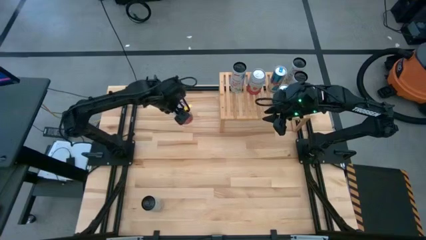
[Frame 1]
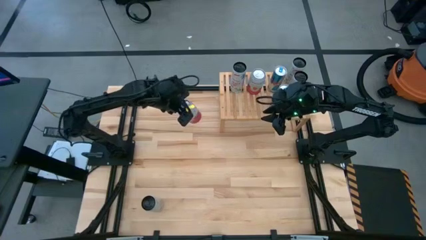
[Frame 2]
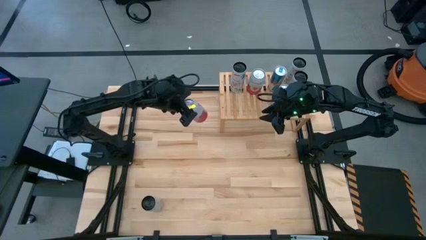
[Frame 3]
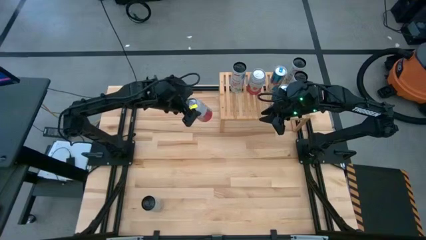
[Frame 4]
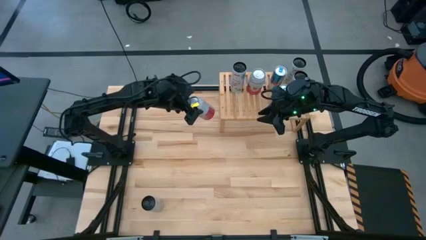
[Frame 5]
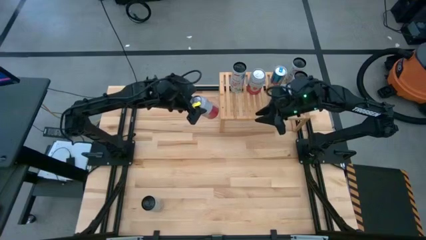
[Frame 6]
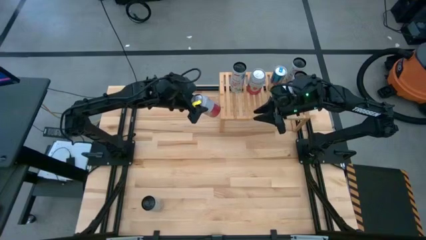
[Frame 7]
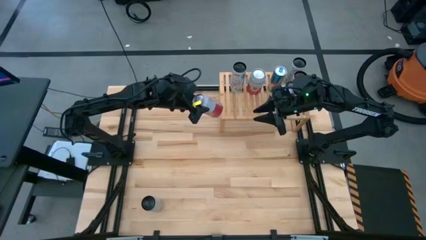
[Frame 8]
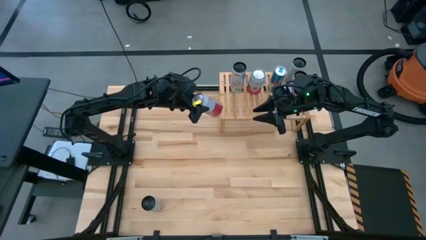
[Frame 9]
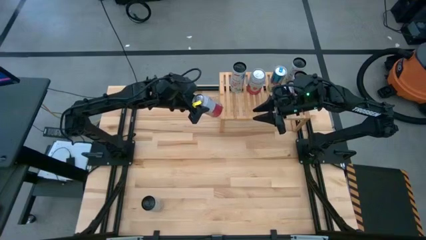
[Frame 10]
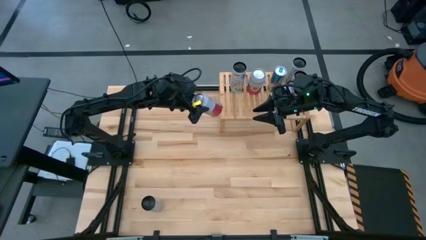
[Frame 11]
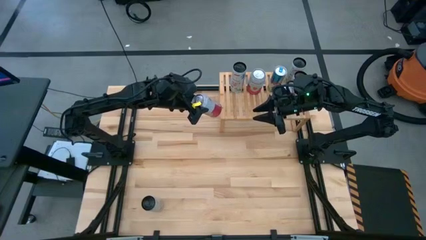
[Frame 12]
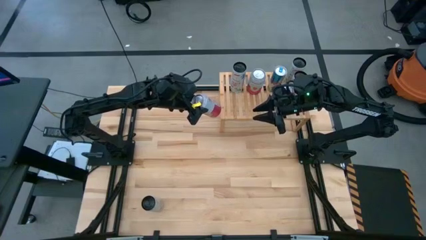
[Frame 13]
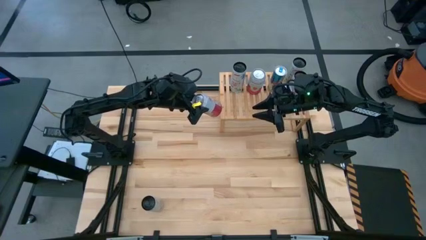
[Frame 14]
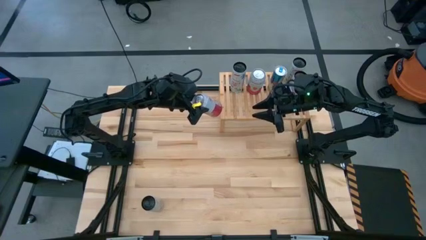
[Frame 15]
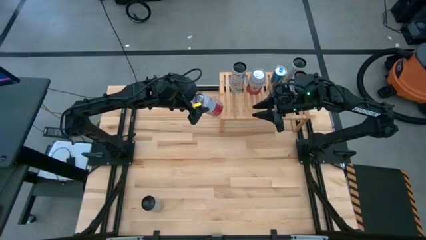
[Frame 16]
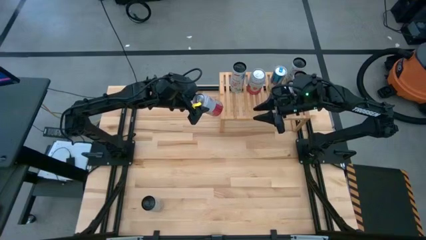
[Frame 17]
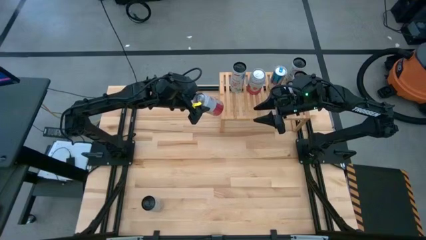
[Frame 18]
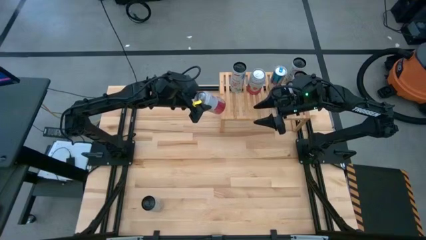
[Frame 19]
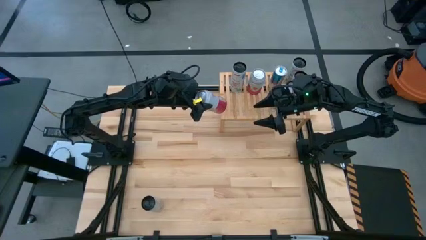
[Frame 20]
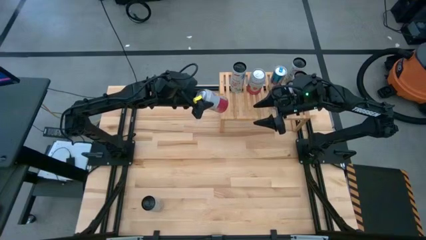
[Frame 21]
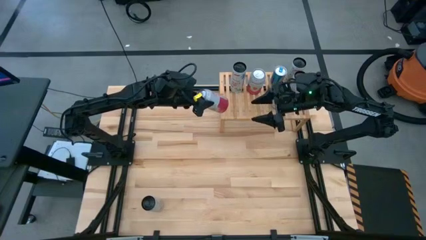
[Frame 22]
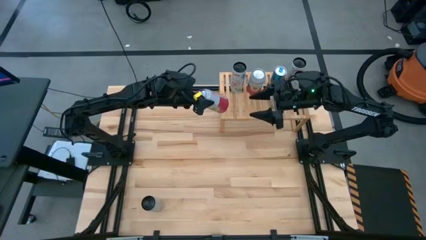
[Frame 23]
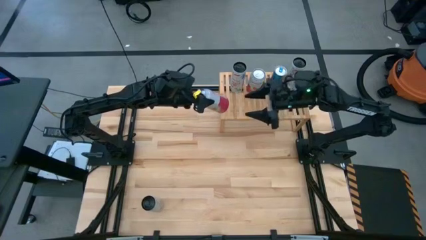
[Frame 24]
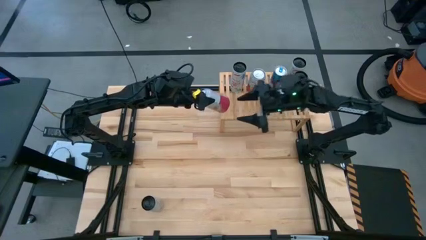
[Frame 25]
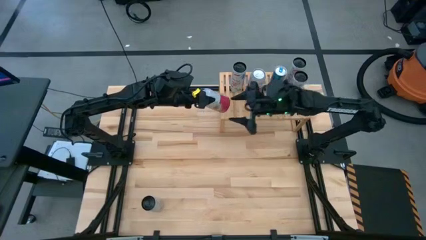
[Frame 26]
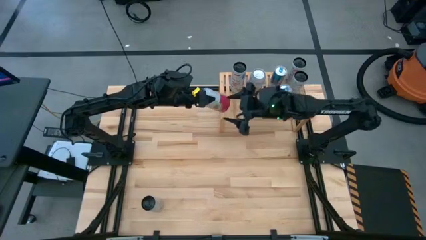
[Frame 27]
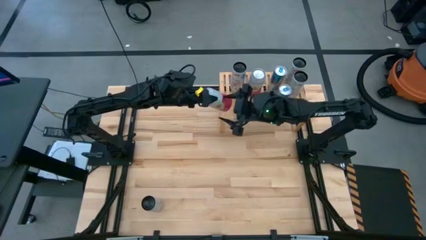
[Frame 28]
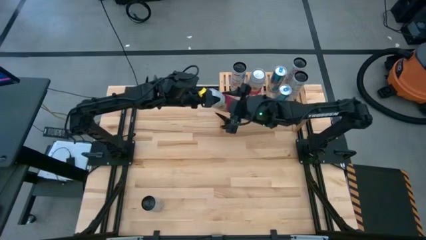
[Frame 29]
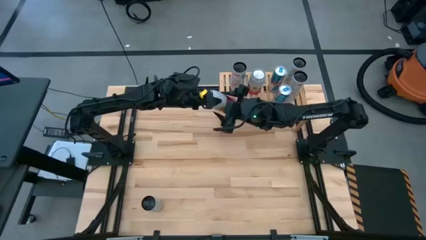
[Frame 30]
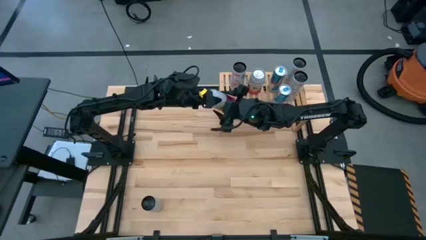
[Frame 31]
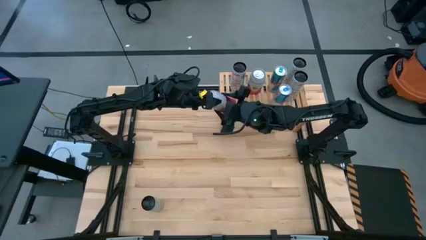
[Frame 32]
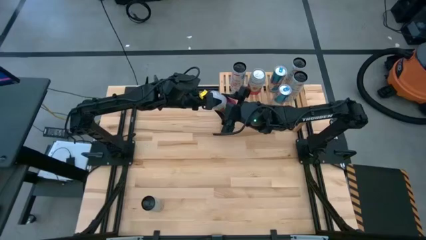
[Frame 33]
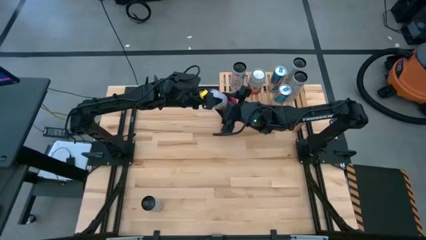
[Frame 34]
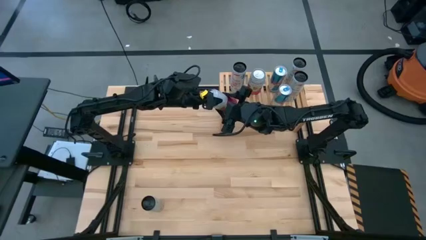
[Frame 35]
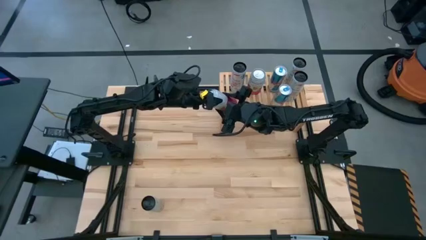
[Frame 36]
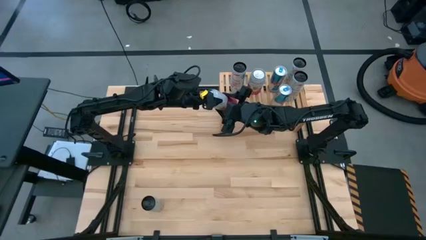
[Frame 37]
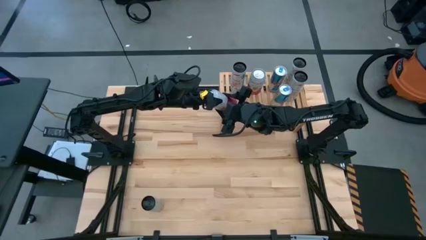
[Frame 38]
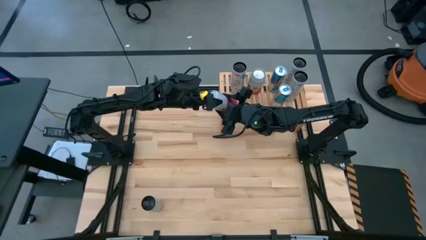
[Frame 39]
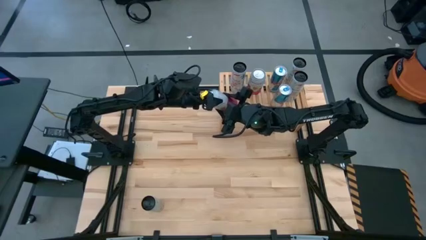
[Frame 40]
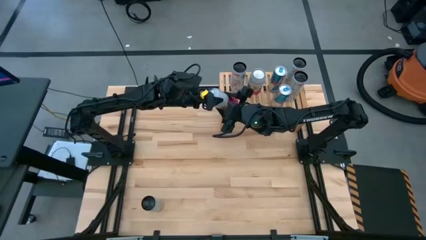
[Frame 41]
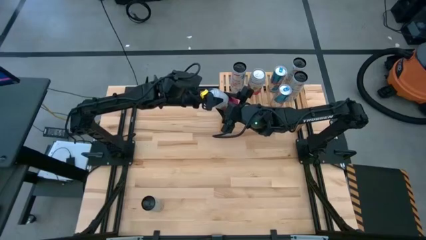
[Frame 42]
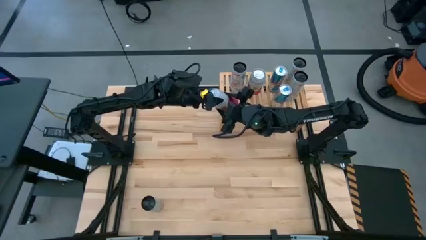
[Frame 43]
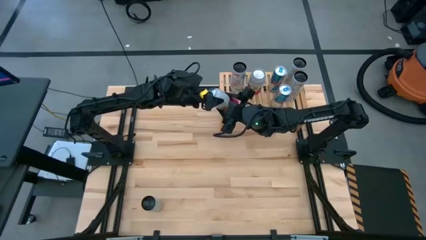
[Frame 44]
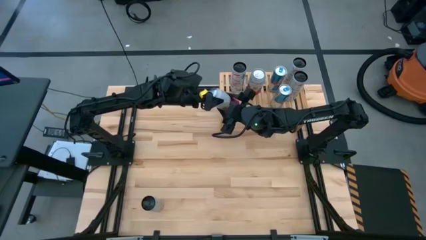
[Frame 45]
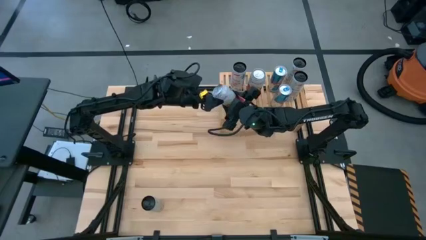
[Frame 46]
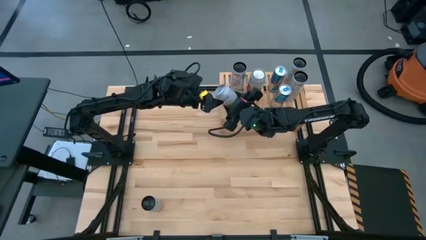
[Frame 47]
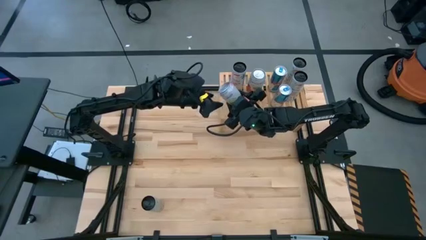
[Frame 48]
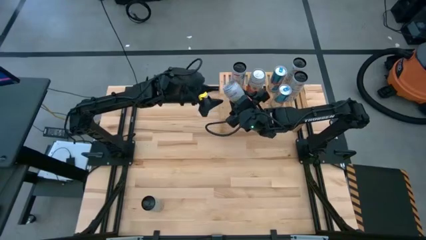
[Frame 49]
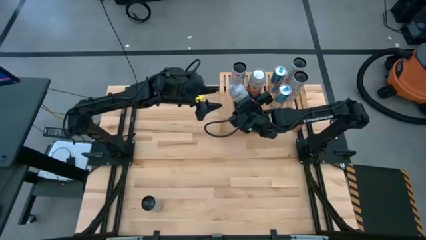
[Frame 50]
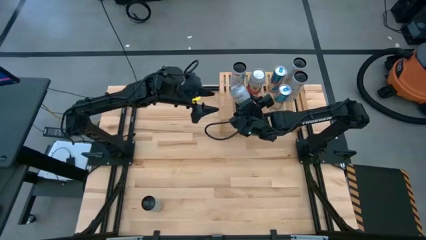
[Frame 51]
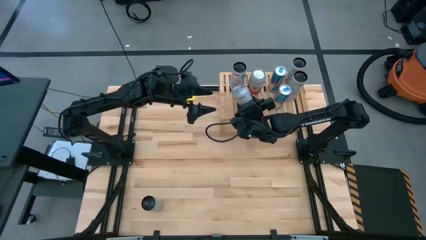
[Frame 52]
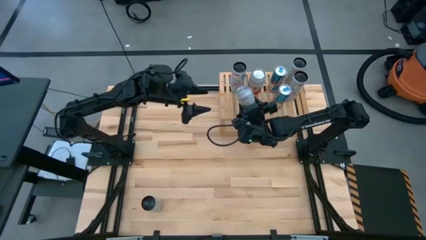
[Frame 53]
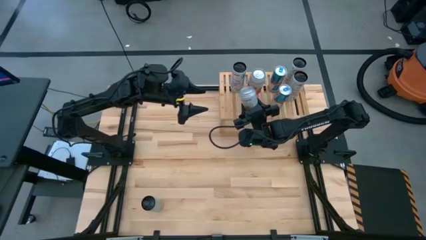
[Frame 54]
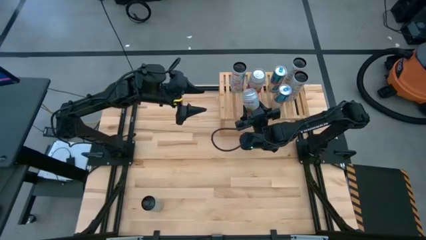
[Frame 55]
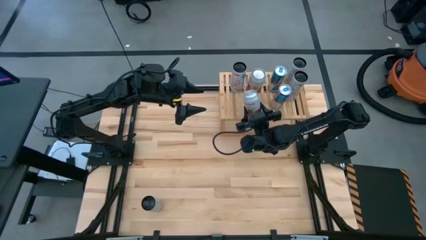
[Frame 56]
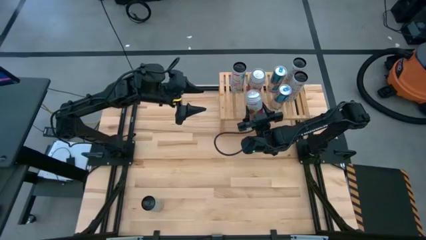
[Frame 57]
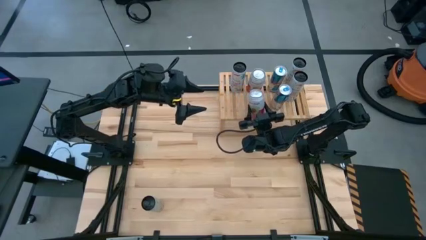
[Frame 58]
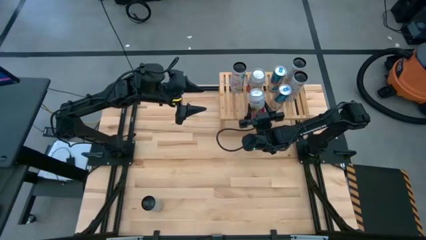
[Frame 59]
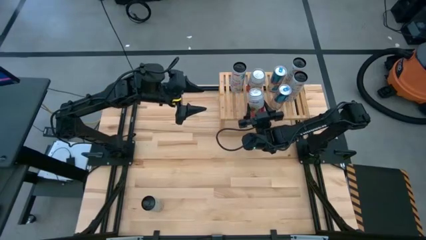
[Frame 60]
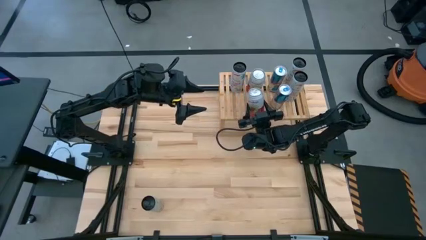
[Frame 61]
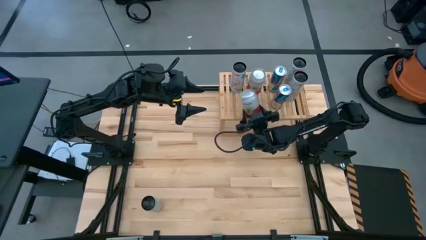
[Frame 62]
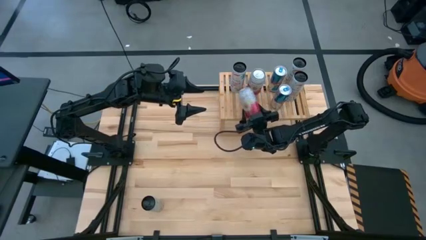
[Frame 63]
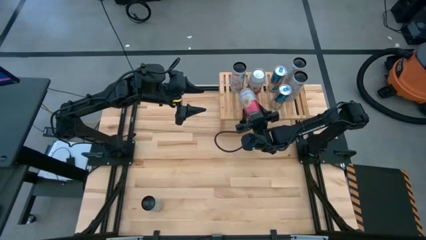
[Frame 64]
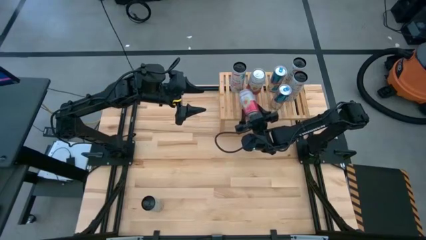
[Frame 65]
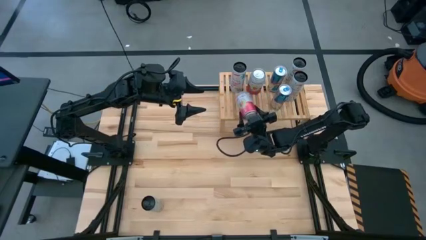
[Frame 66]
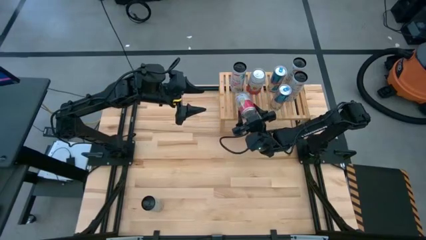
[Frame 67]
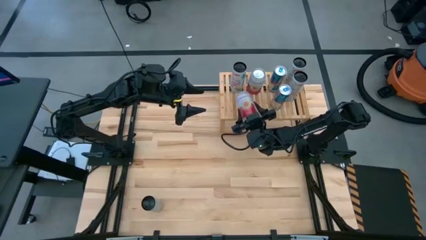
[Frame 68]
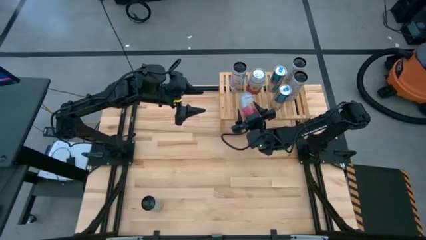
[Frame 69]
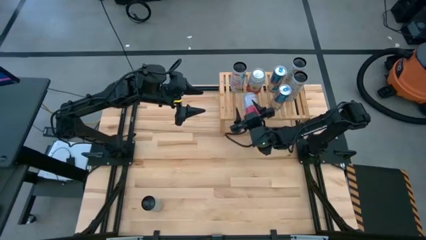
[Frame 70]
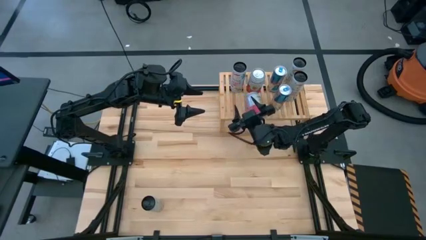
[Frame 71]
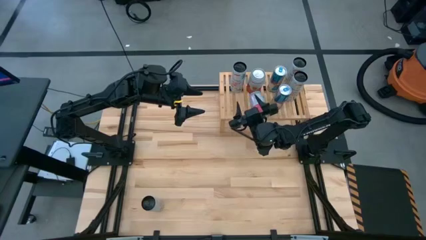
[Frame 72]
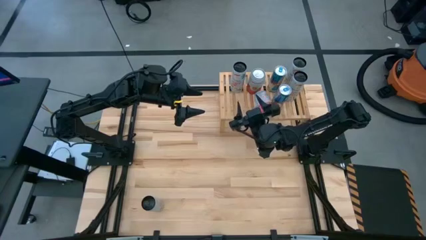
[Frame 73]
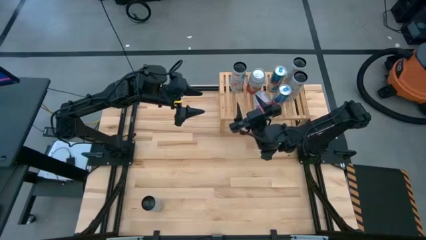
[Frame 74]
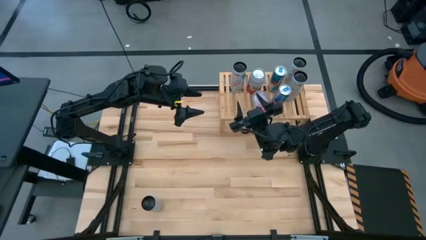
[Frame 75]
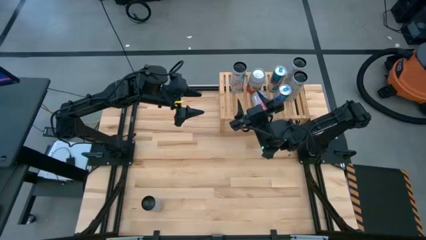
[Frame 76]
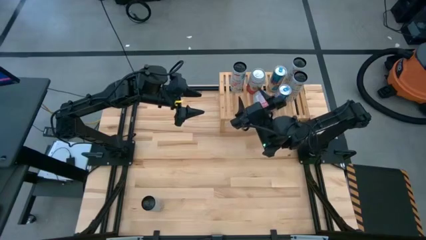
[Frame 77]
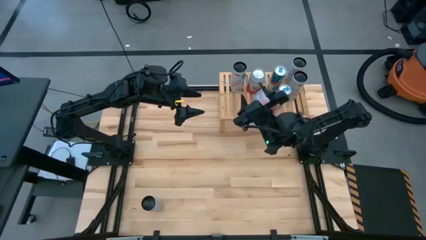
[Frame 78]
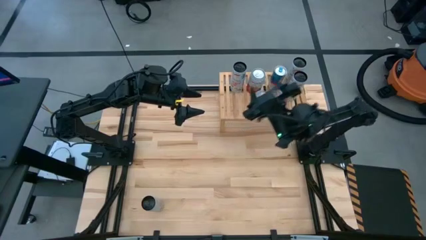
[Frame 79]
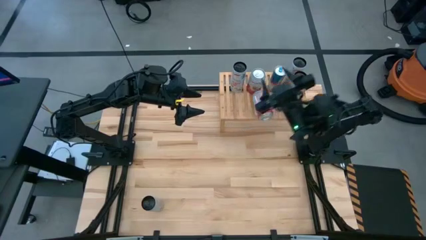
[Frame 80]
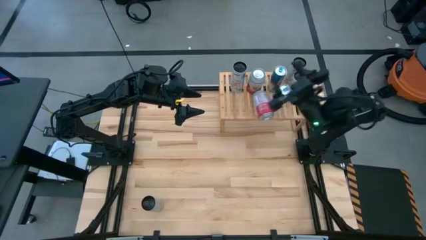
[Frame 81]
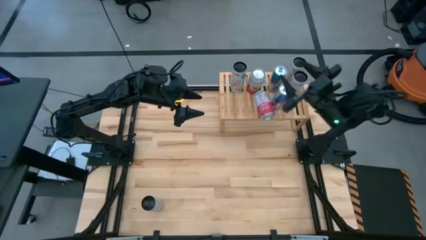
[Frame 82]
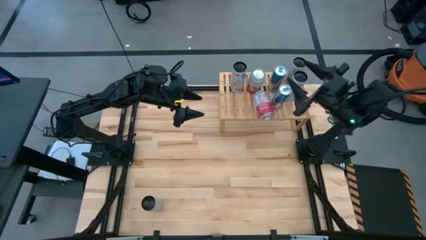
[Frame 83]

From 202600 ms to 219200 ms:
Task: Place canned beverage on shelf
Put the pink-white soda can on the shelf aligned with the other pink-white soda can
